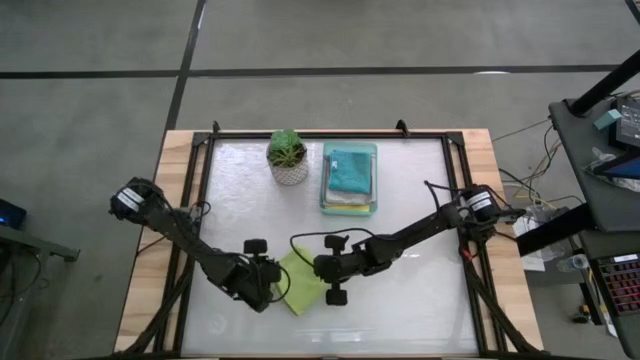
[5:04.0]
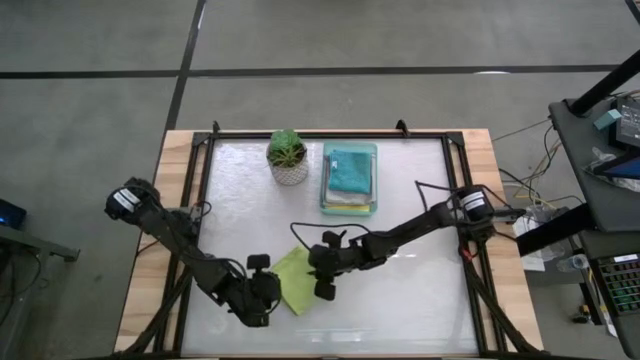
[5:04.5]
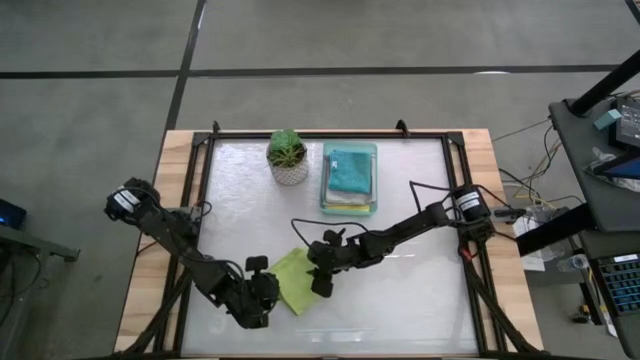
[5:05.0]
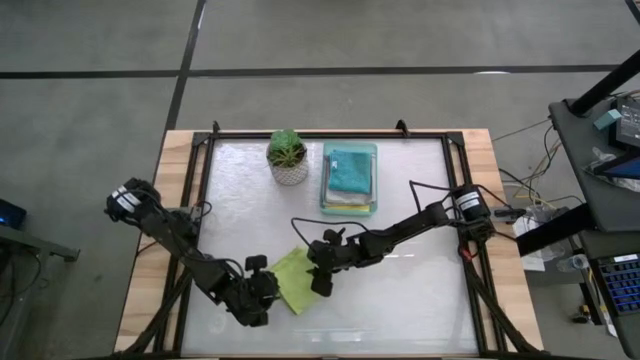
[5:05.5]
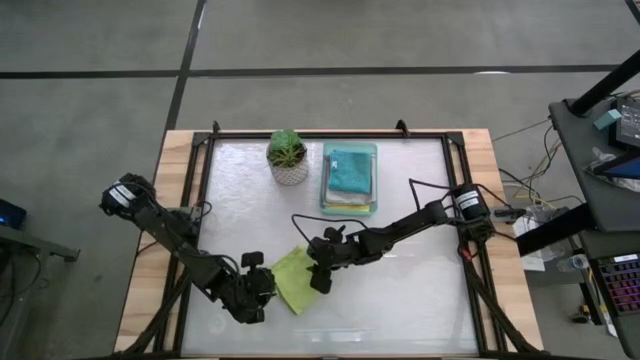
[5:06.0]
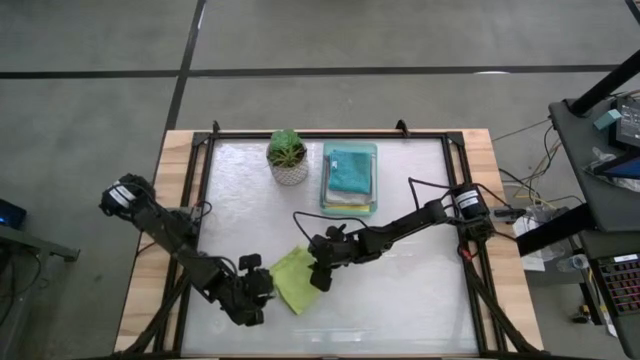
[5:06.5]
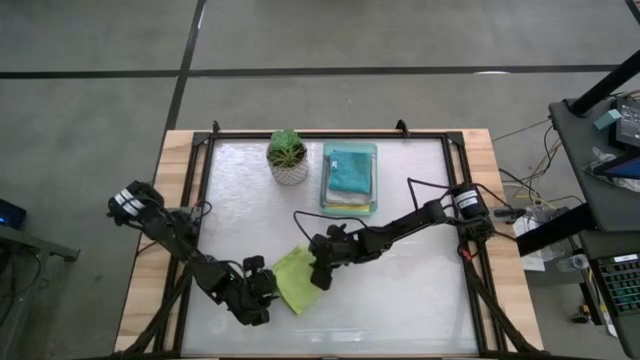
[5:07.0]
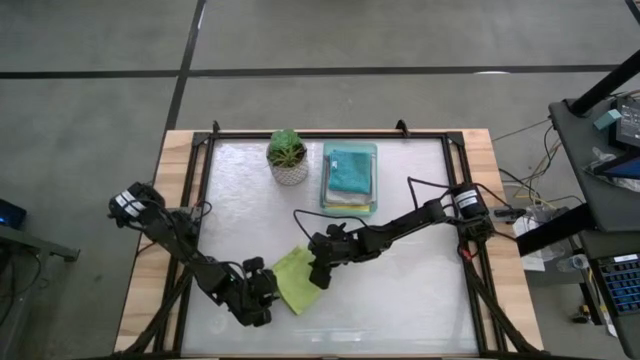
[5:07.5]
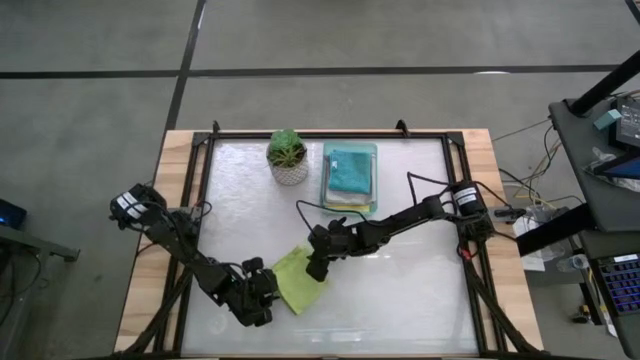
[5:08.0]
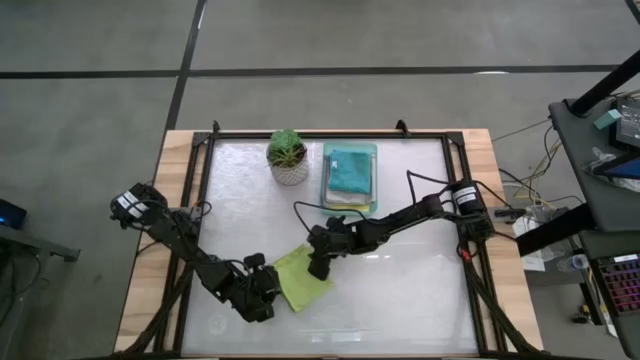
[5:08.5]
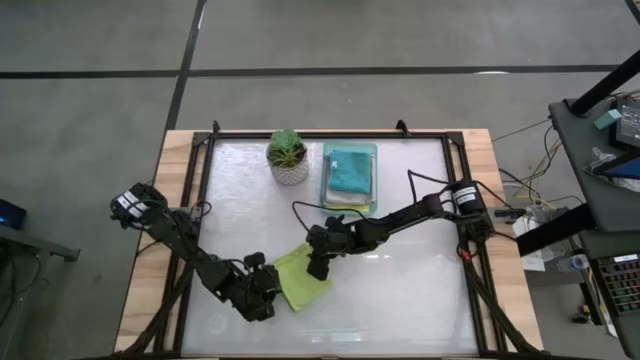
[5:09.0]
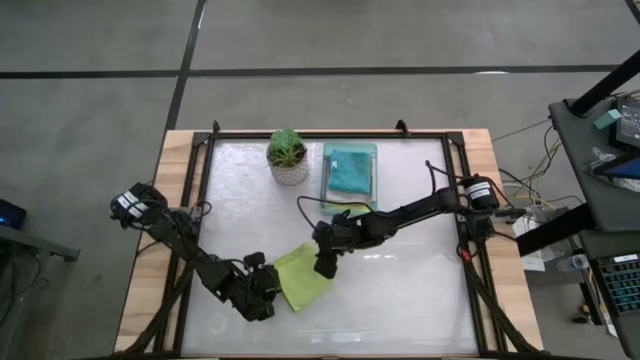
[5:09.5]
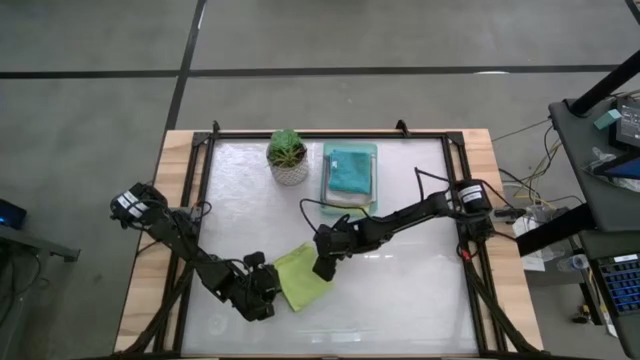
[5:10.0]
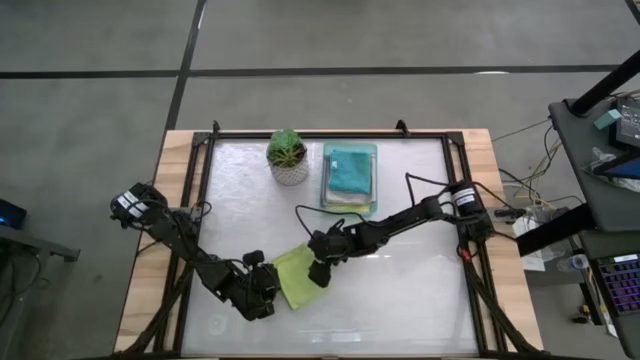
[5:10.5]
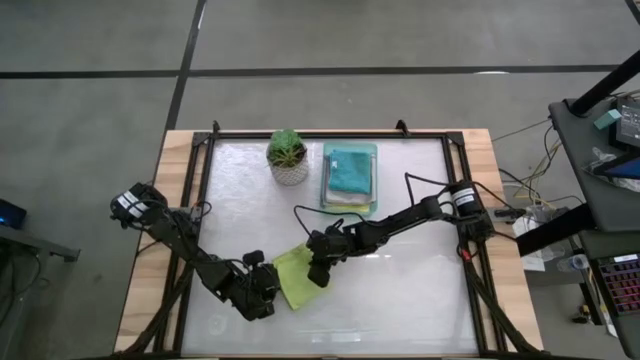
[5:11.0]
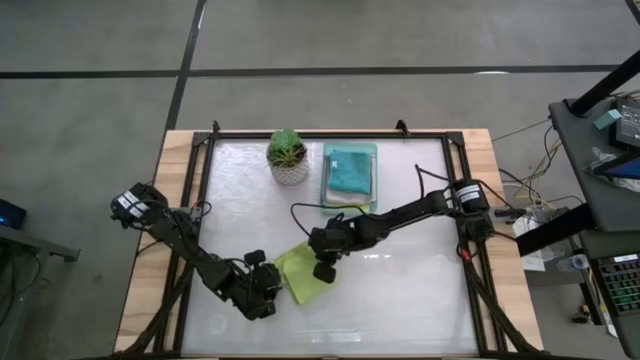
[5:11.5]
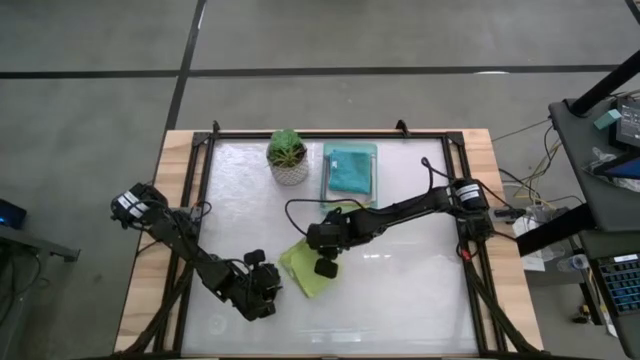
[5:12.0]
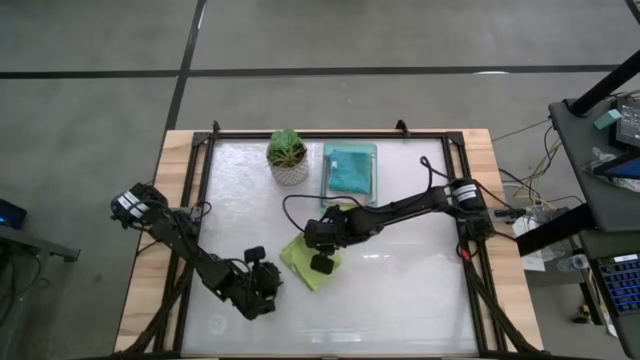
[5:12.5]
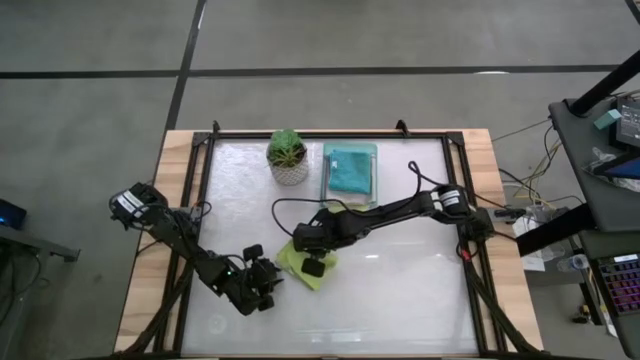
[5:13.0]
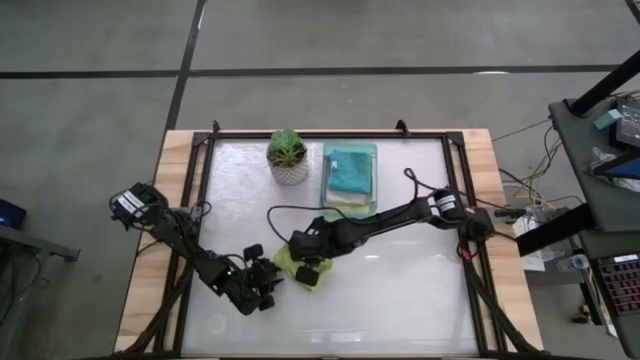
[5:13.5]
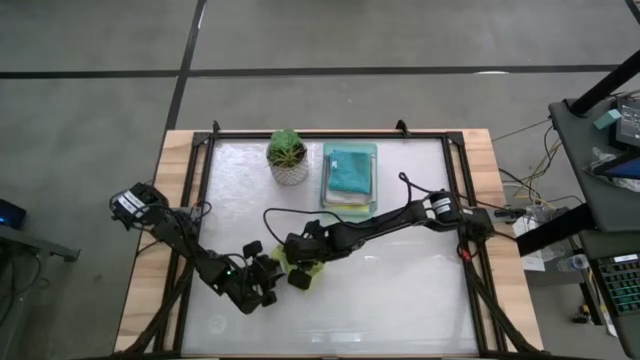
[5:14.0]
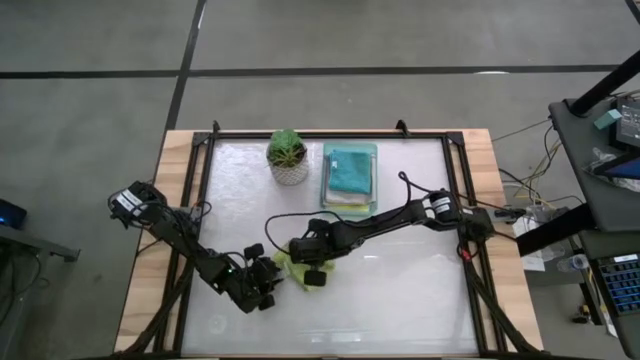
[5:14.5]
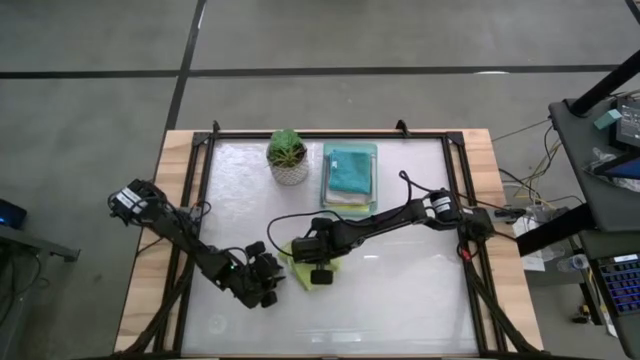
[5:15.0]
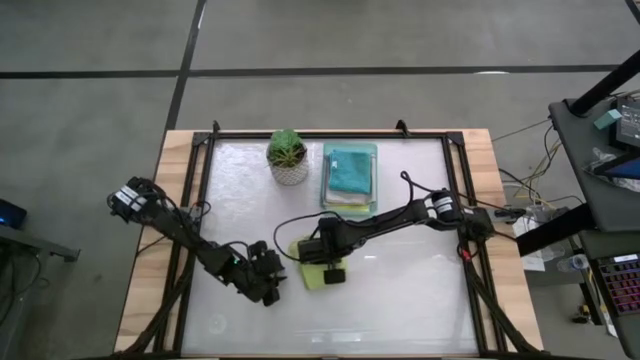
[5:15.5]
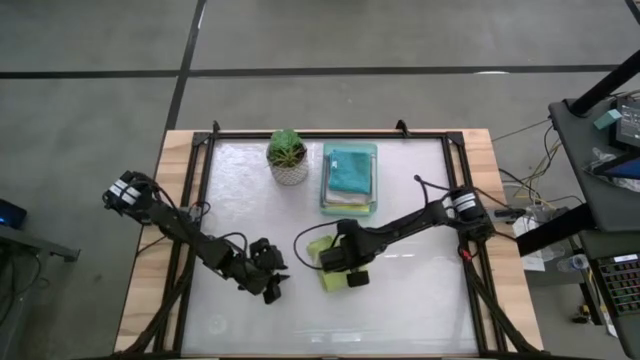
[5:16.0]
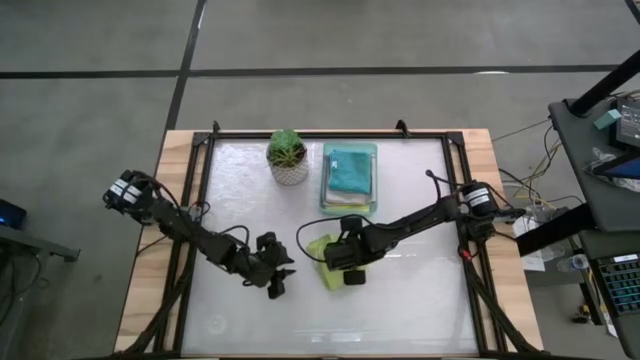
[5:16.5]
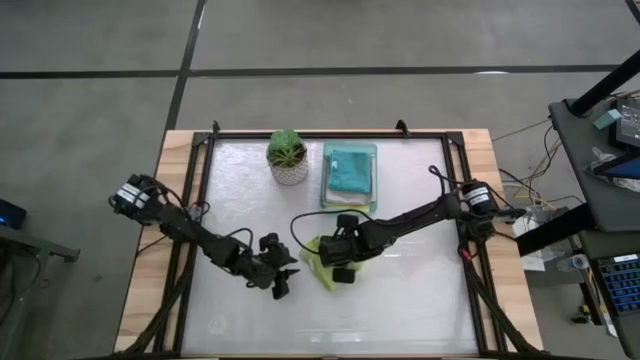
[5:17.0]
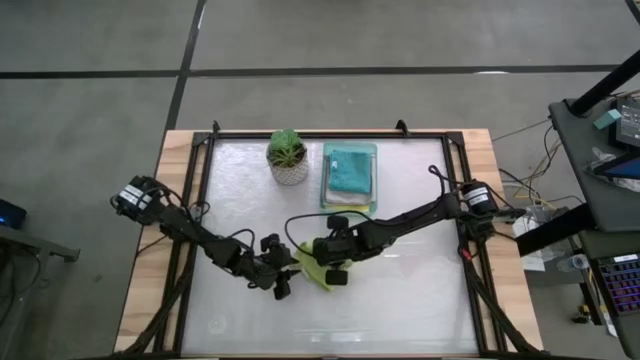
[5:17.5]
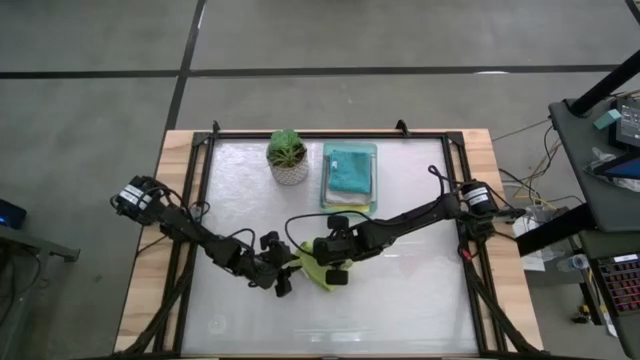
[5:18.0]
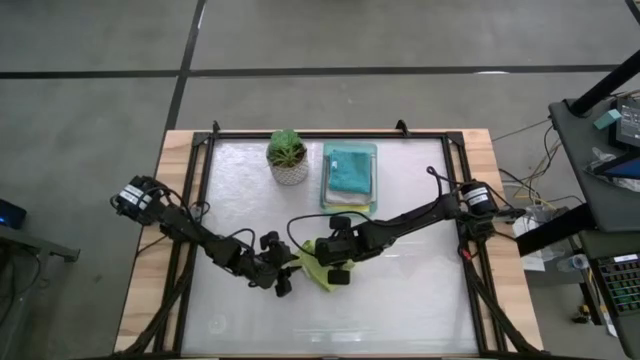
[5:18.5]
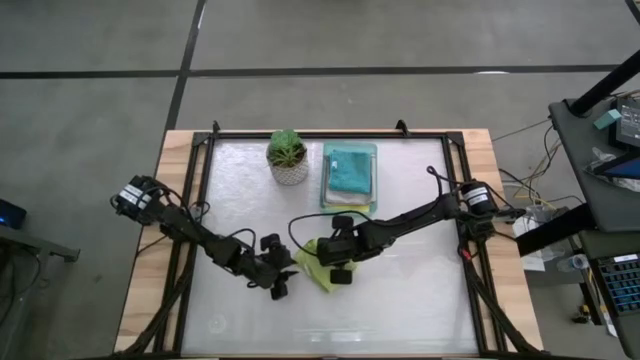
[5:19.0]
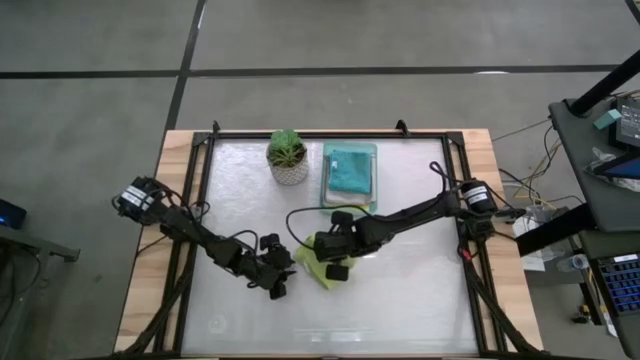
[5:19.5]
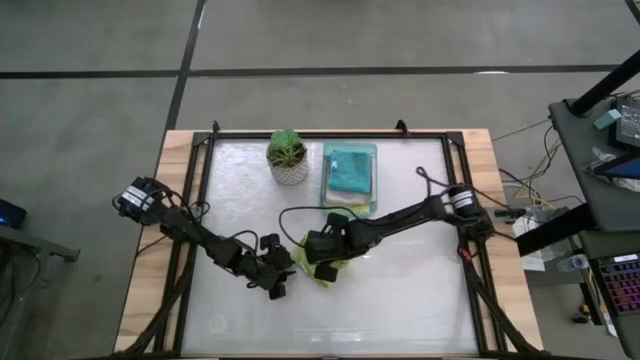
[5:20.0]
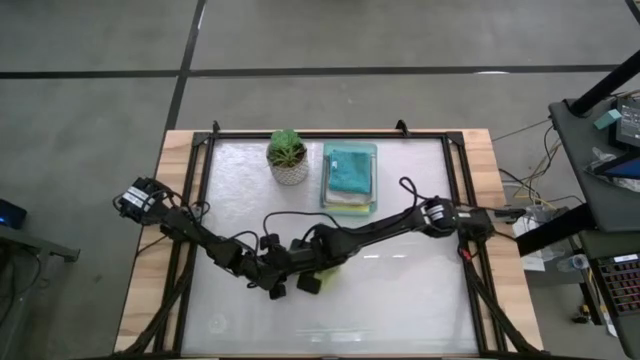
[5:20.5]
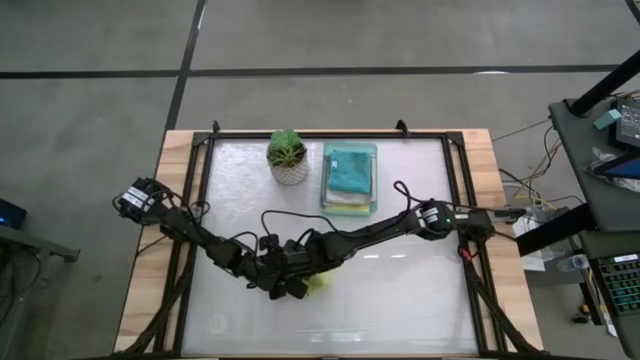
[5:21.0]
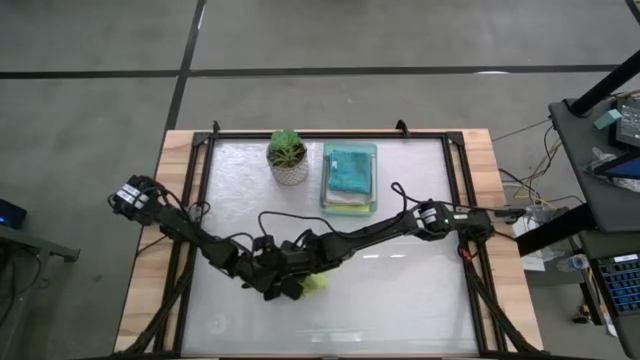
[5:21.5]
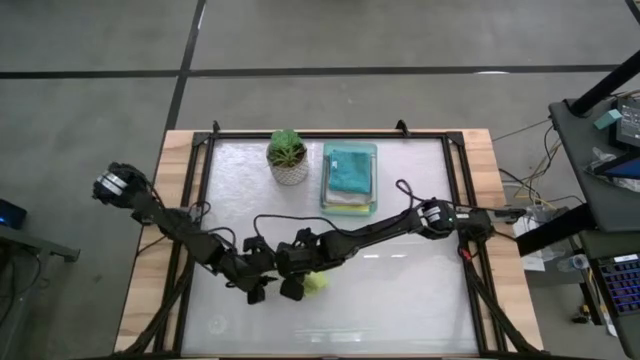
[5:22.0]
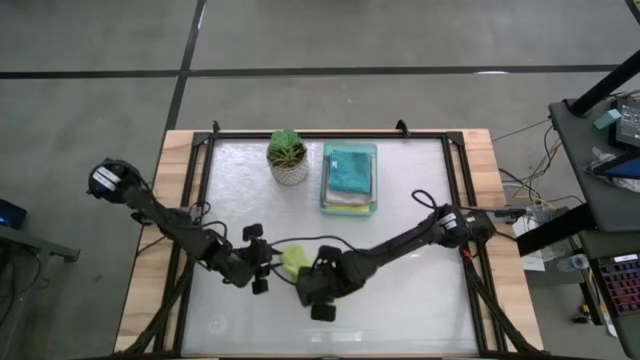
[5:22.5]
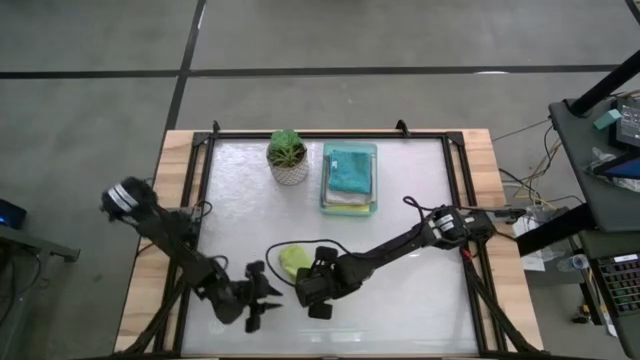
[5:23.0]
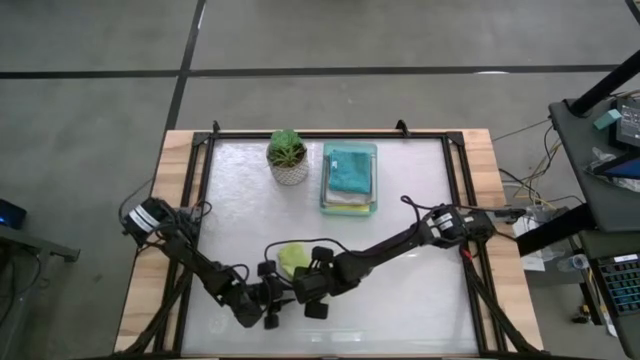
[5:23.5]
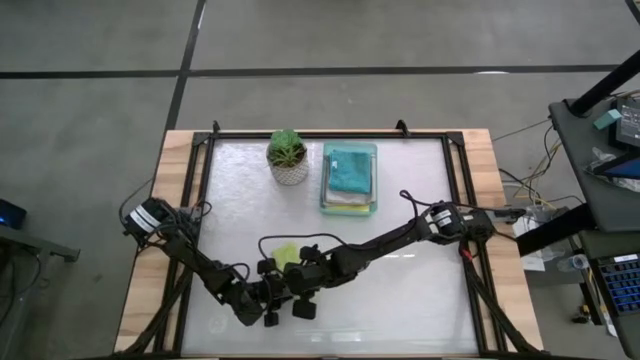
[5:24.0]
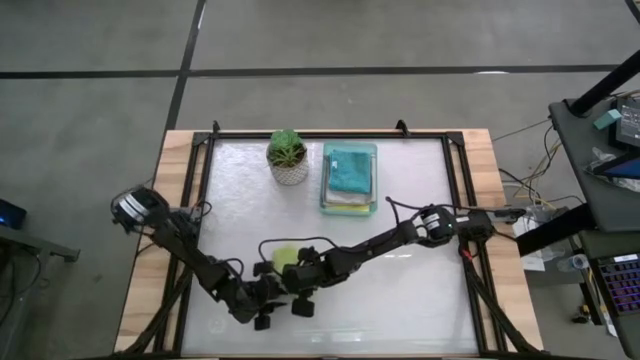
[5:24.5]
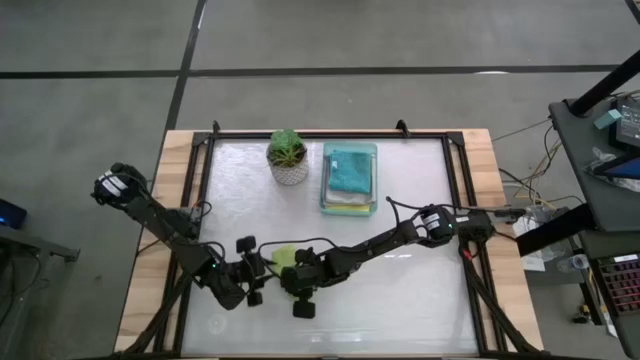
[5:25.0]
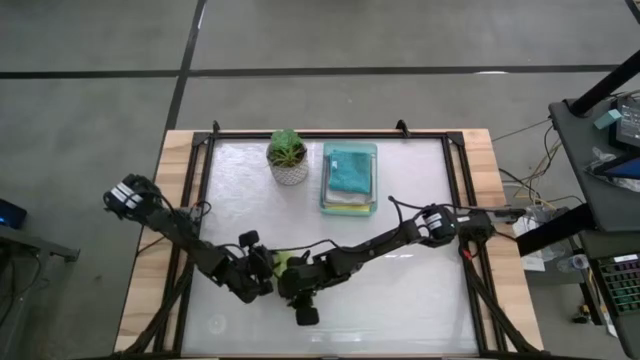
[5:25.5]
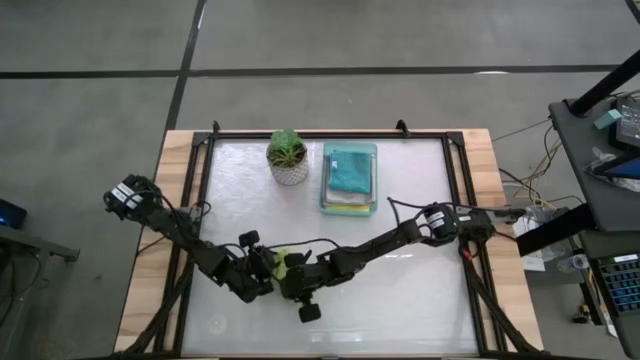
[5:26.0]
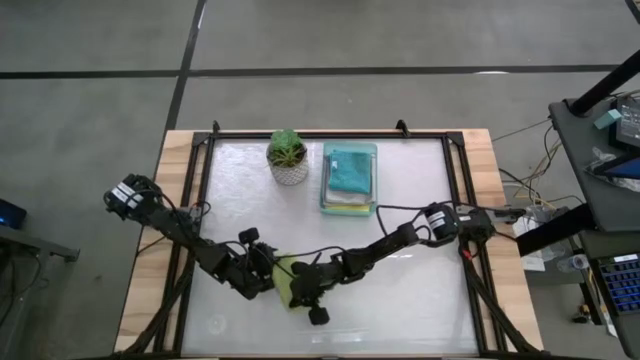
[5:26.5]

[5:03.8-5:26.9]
Task: Fold microfiber towels
Fold the green microfiber cloth
